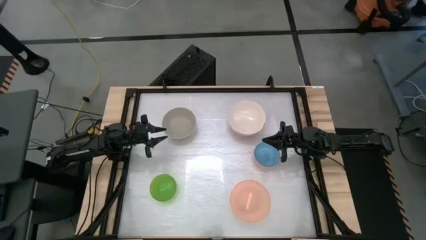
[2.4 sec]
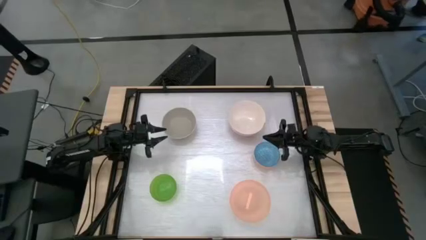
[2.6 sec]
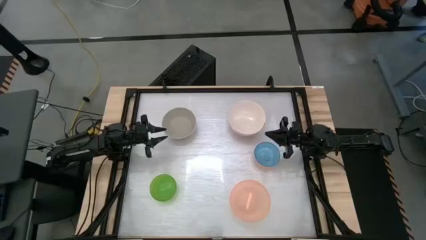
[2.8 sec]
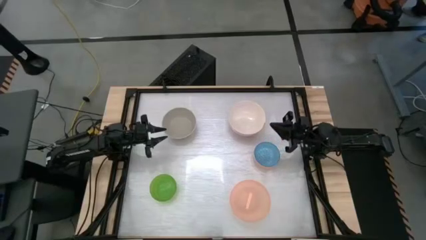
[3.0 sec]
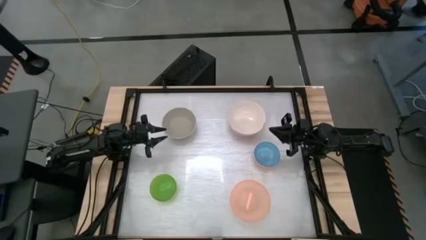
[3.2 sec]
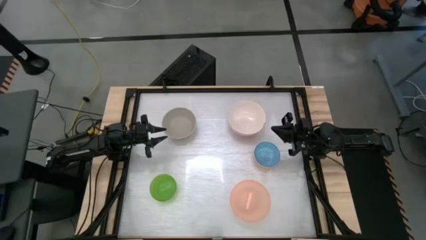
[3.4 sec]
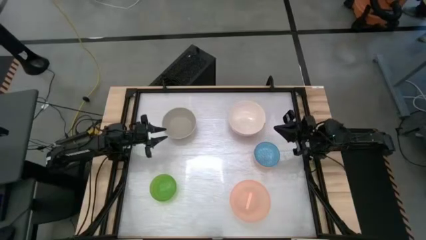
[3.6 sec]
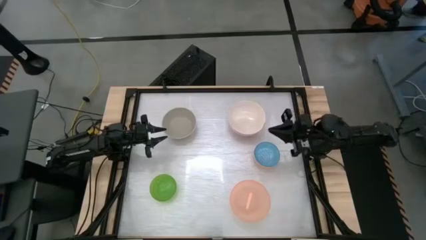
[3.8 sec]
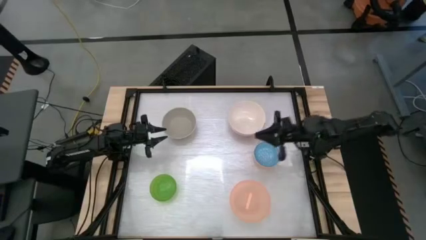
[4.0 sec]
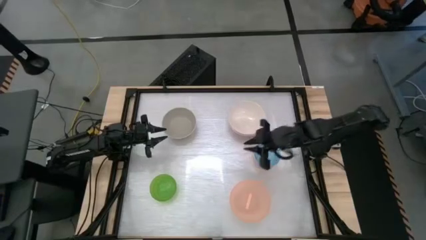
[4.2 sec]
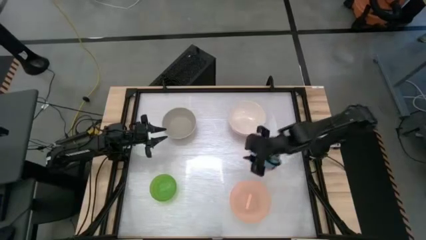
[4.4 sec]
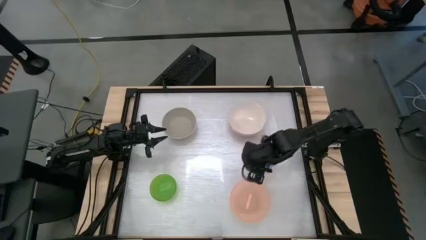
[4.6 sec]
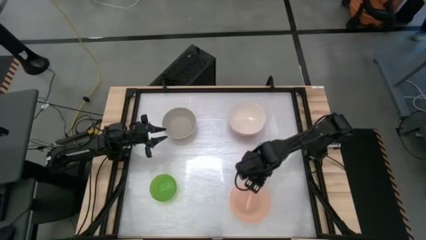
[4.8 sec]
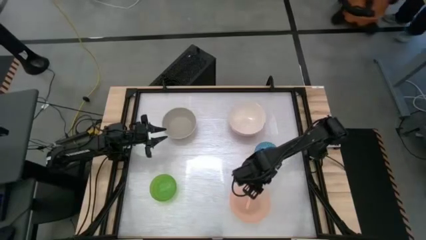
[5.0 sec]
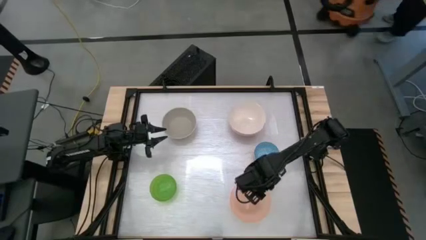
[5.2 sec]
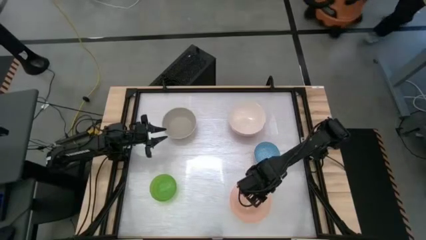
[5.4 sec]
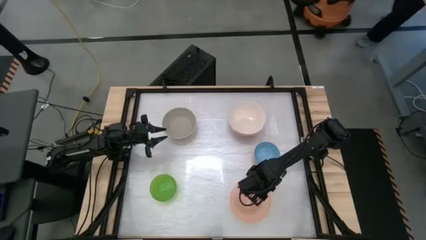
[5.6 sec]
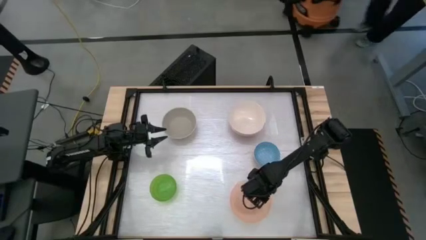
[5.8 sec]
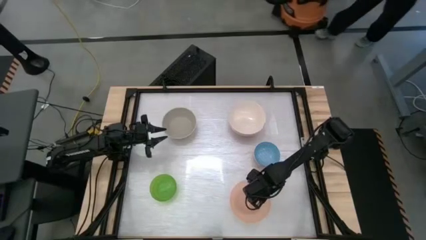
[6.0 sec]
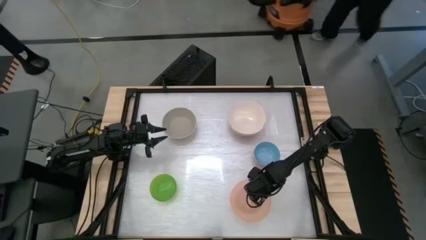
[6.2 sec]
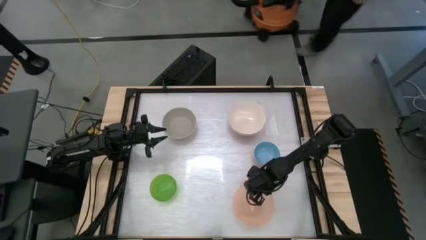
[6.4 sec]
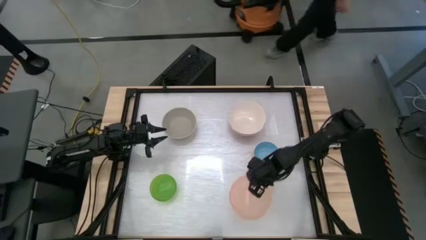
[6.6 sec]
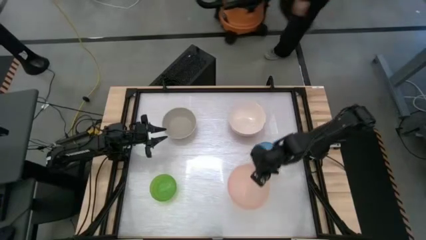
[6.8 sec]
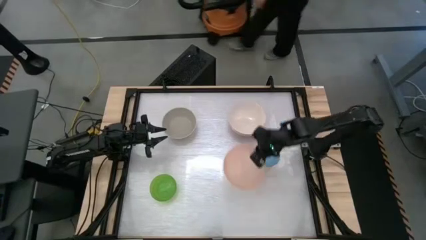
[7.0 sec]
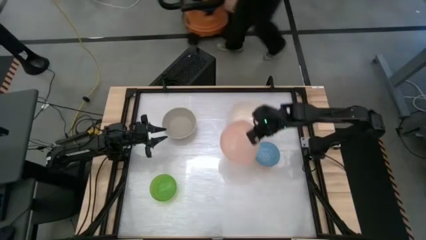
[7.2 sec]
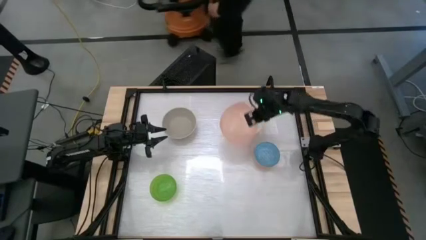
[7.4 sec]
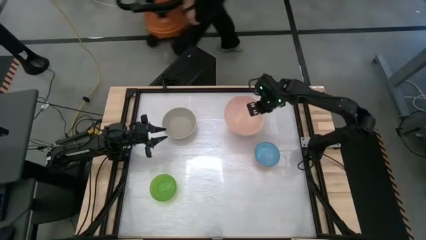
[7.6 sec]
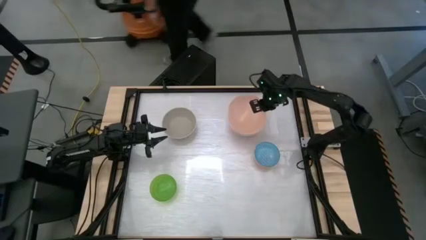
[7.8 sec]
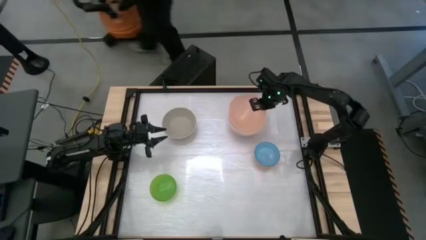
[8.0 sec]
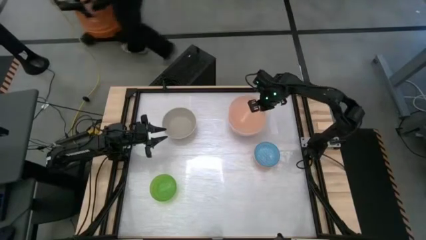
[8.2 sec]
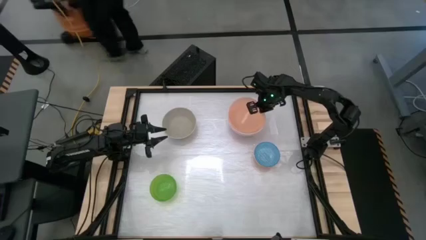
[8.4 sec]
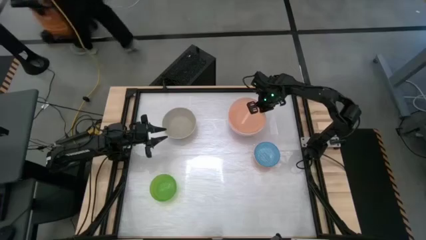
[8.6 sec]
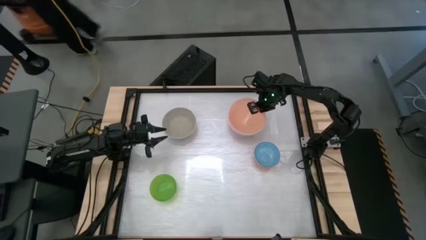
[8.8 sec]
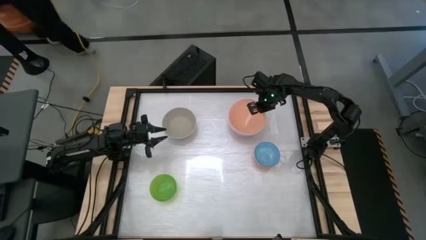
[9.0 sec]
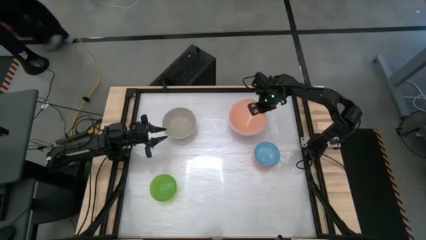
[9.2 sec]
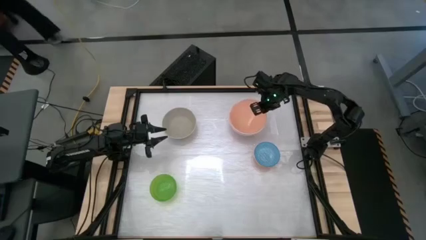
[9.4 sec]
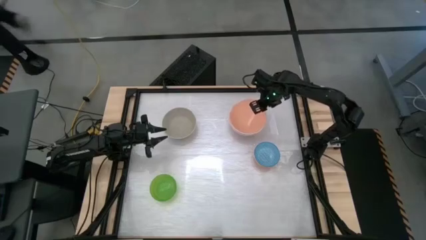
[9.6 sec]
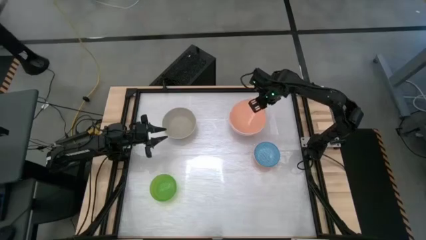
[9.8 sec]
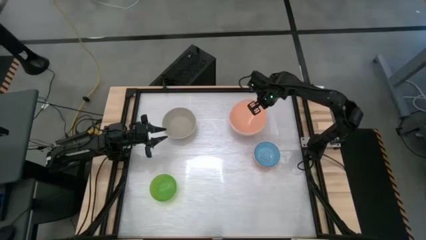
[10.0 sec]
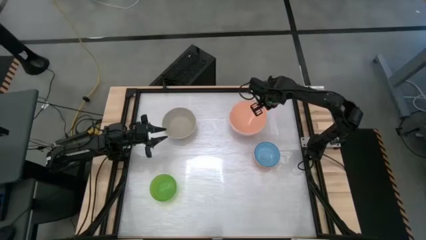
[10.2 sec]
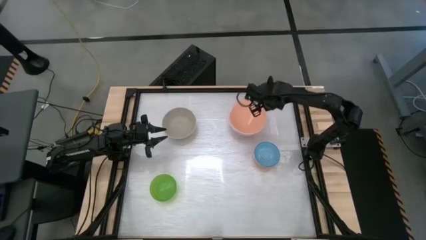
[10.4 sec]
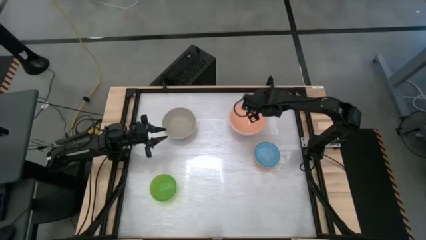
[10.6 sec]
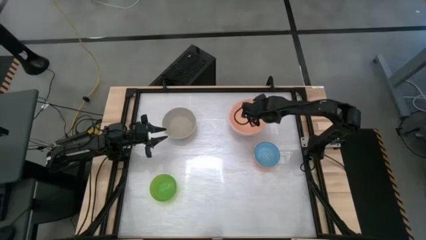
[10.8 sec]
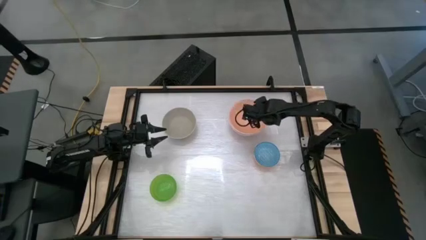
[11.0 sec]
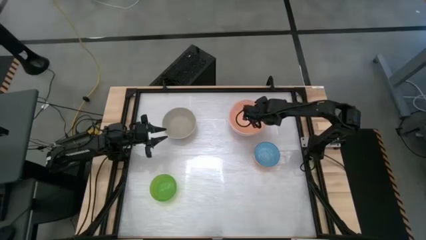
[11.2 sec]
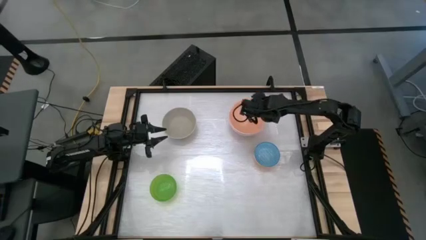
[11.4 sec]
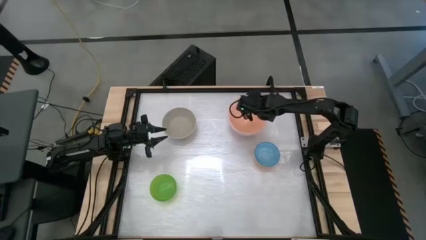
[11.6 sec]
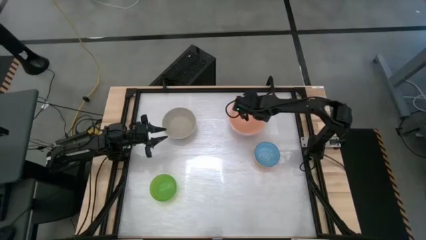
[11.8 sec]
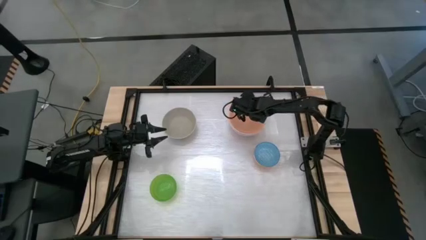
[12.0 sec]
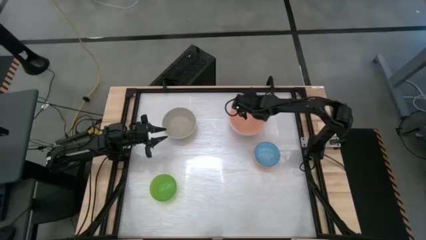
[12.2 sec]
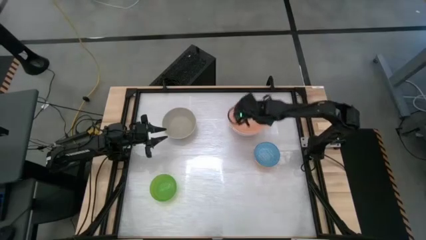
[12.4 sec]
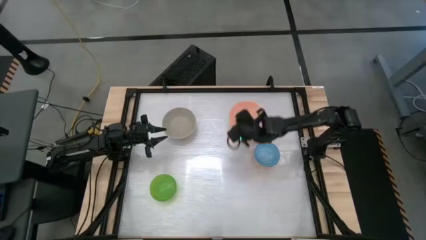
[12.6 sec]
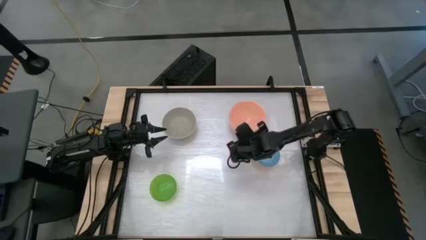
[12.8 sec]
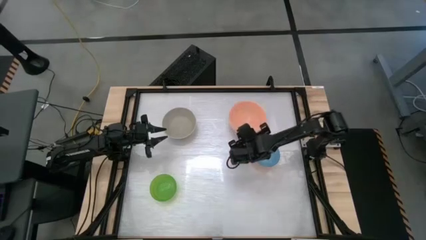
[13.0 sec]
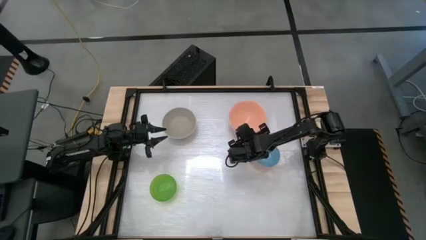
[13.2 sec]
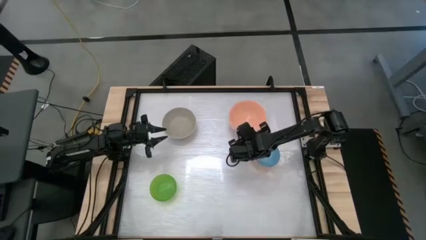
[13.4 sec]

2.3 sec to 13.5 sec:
Stack the orange bowl on top of the pink bowl

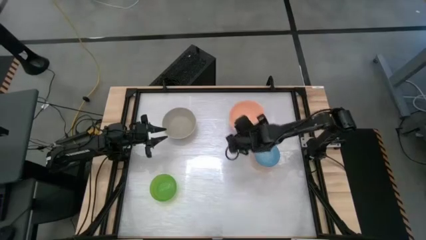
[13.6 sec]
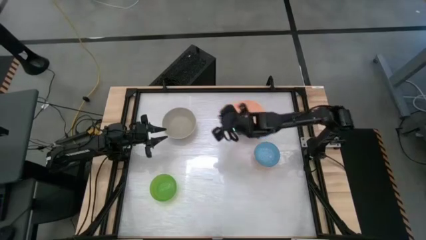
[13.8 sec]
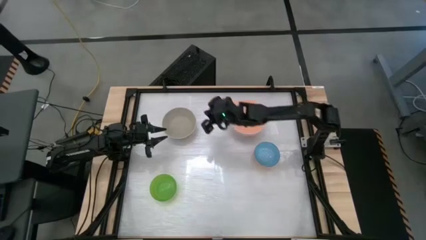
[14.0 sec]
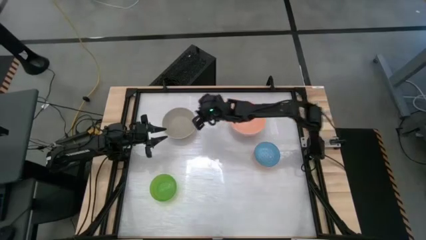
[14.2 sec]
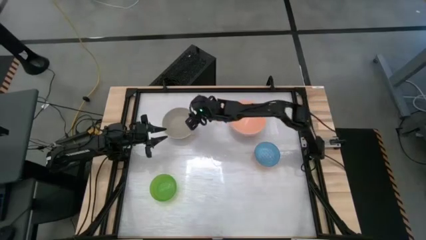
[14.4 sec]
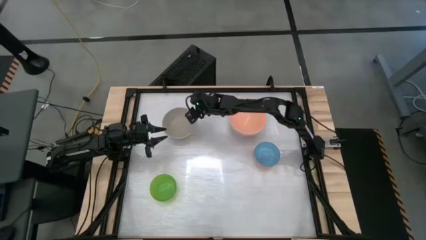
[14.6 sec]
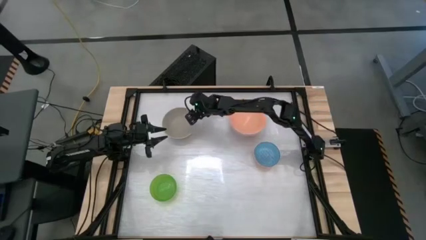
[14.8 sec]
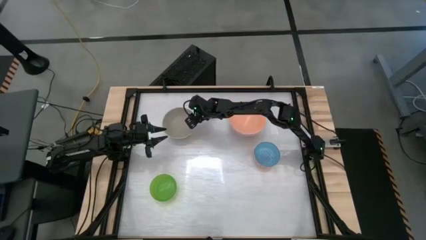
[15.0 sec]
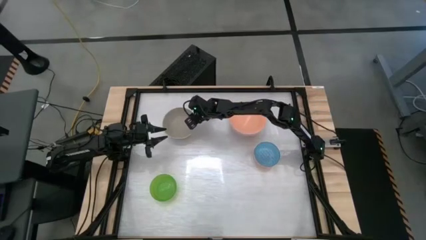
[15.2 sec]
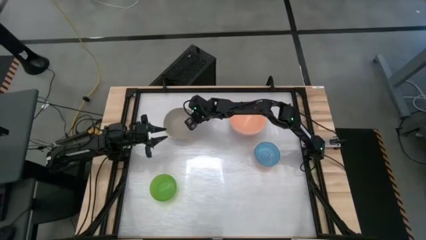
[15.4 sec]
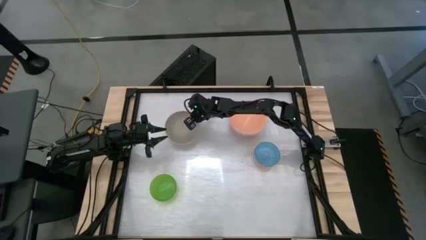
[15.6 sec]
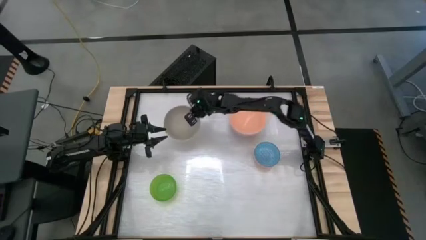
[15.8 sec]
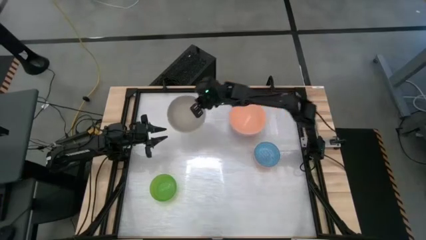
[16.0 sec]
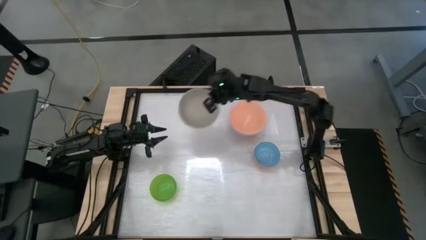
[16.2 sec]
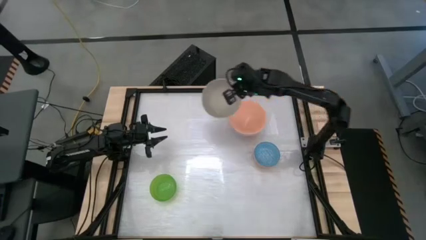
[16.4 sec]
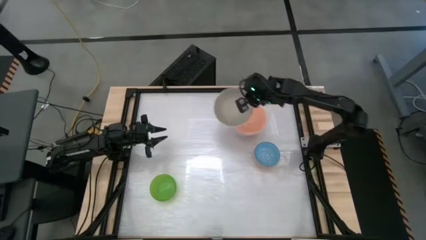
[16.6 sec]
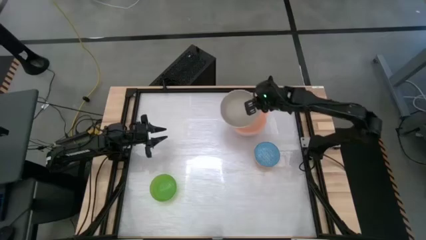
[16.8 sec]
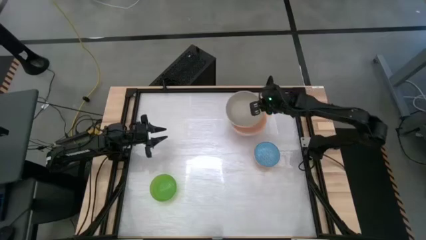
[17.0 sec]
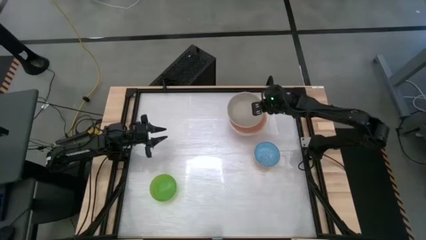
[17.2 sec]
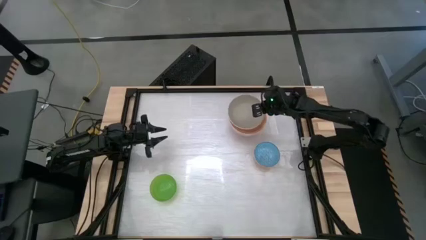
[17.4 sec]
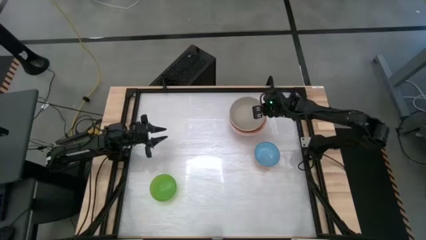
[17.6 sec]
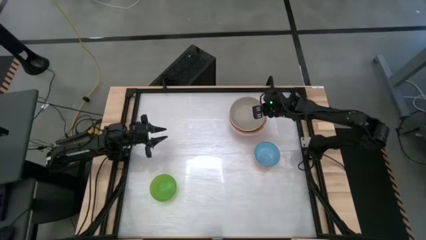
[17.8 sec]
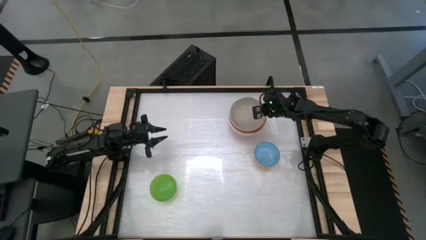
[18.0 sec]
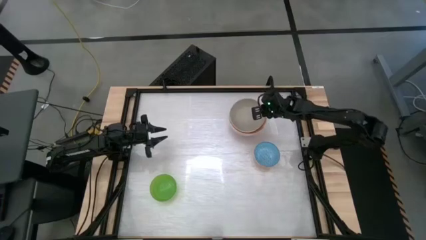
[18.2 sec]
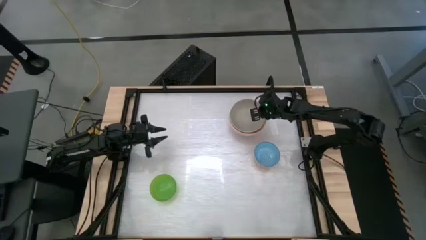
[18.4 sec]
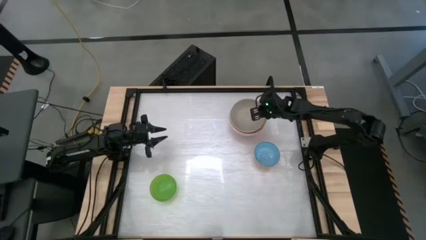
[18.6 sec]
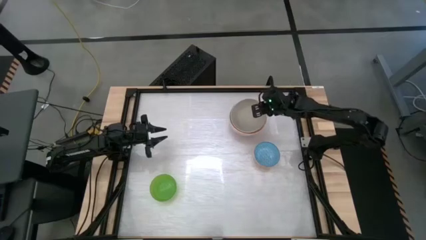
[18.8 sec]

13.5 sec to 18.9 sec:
Stack the gray bowl on top of the orange bowl
